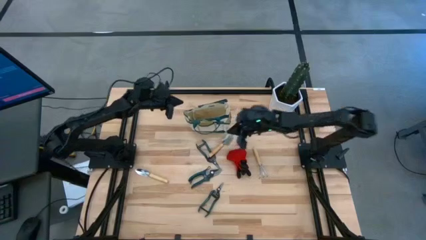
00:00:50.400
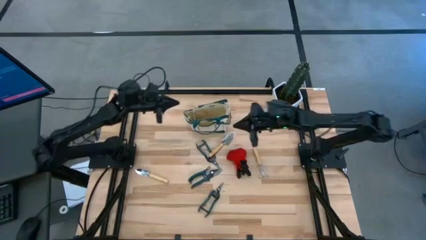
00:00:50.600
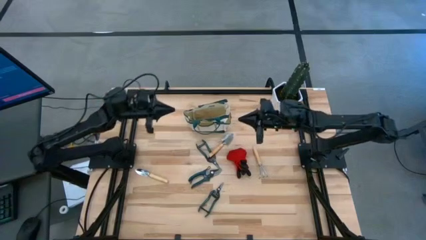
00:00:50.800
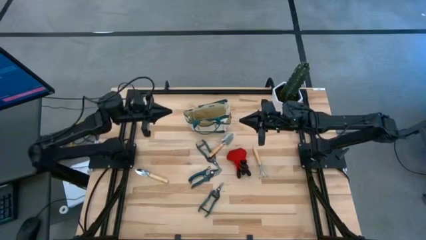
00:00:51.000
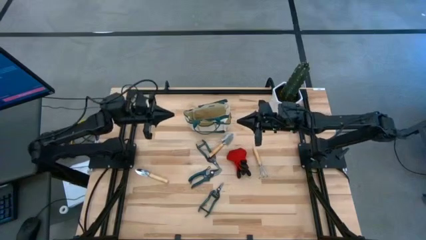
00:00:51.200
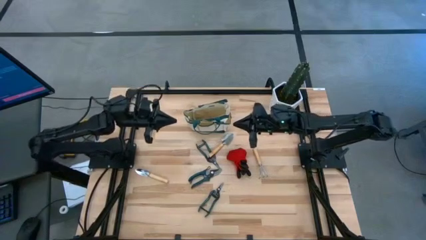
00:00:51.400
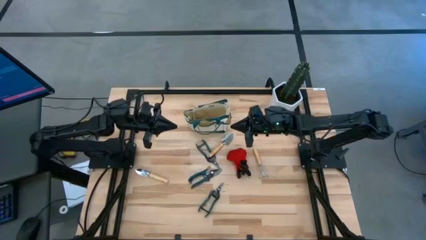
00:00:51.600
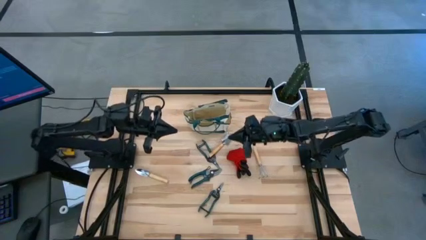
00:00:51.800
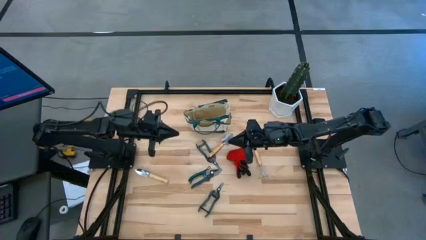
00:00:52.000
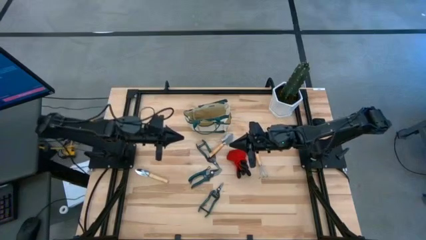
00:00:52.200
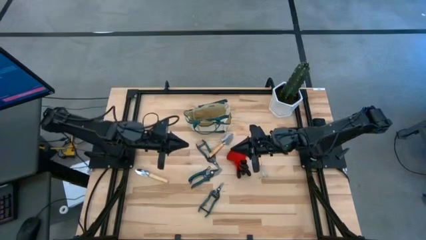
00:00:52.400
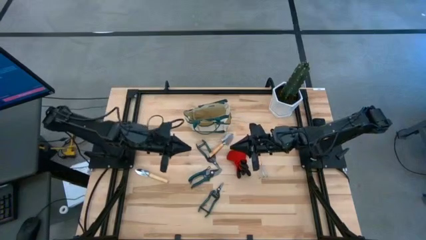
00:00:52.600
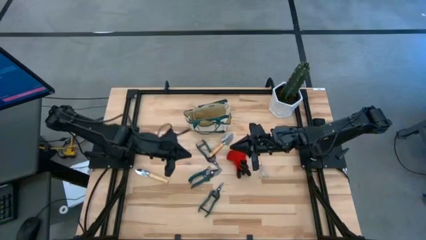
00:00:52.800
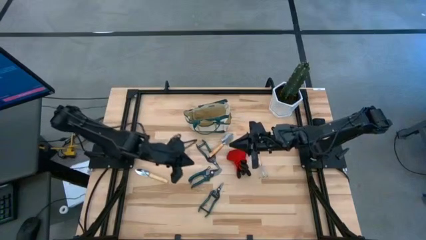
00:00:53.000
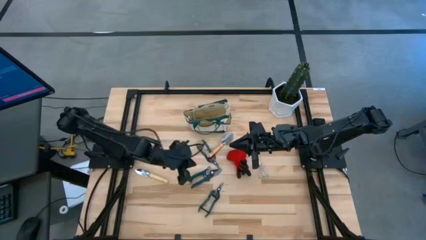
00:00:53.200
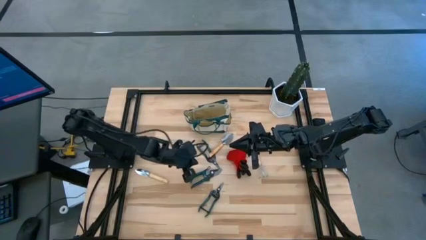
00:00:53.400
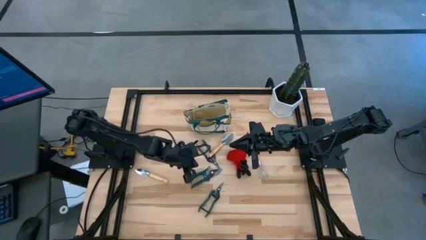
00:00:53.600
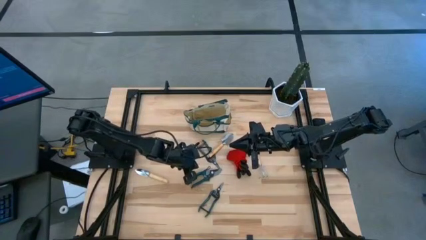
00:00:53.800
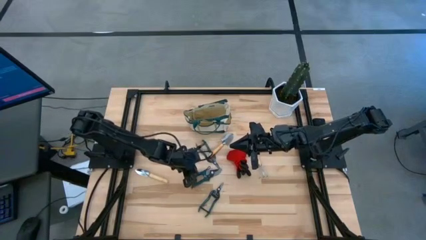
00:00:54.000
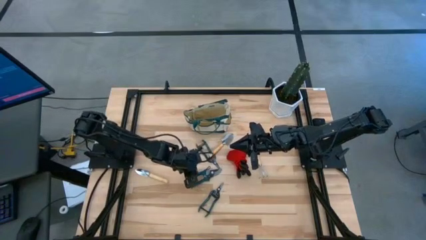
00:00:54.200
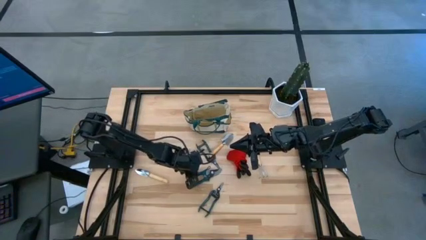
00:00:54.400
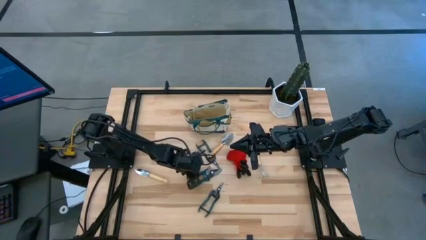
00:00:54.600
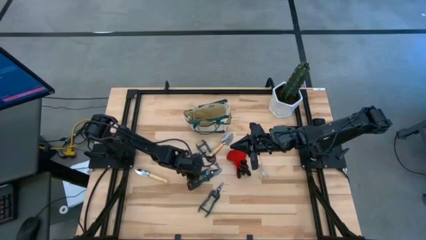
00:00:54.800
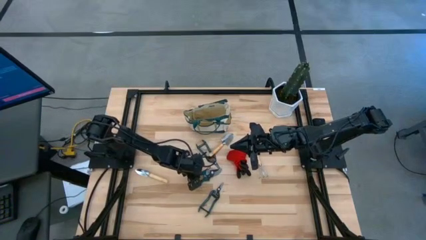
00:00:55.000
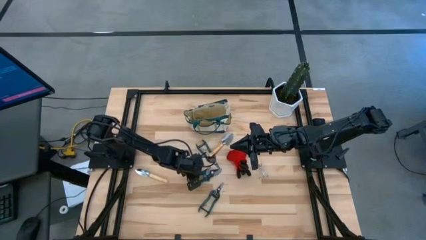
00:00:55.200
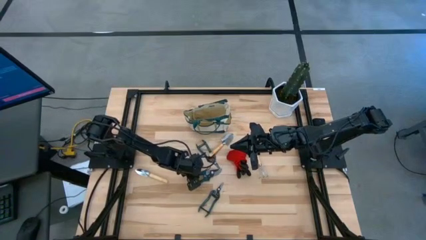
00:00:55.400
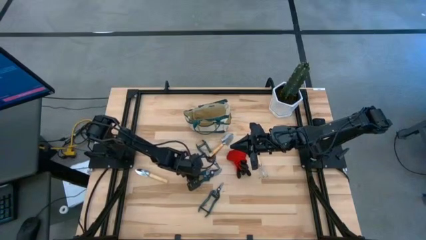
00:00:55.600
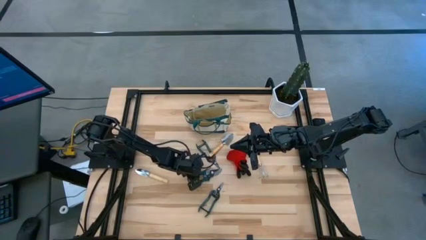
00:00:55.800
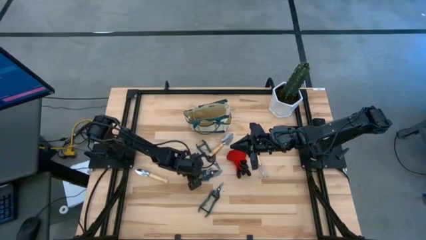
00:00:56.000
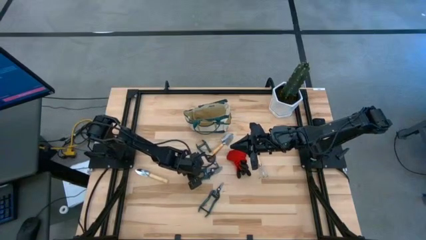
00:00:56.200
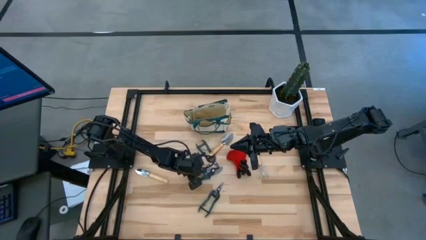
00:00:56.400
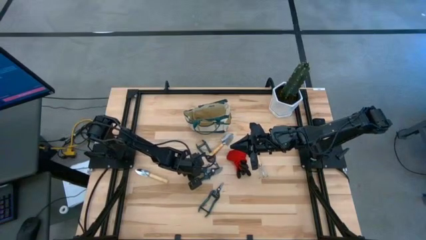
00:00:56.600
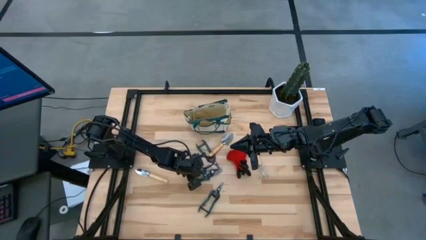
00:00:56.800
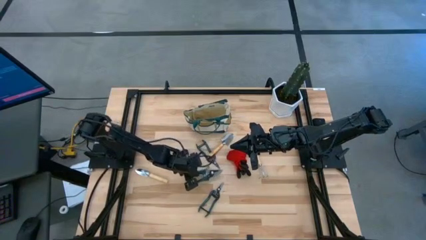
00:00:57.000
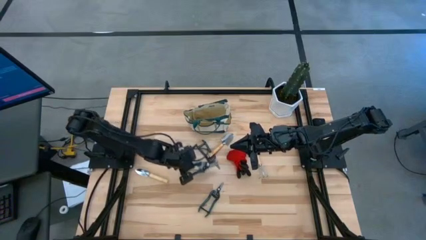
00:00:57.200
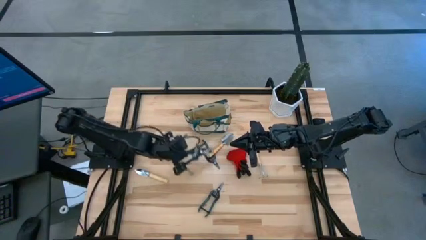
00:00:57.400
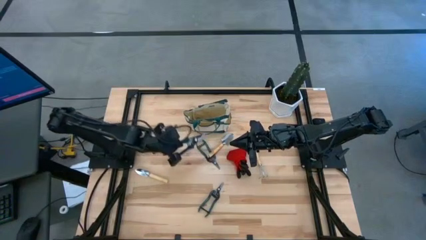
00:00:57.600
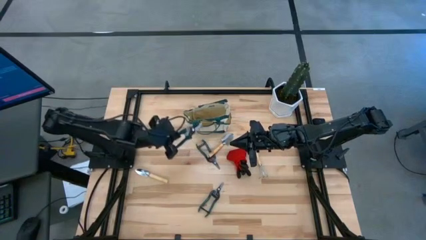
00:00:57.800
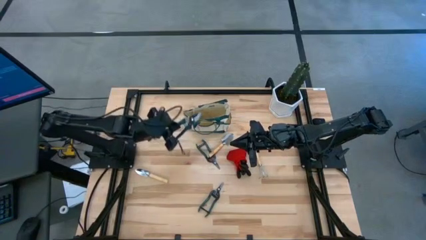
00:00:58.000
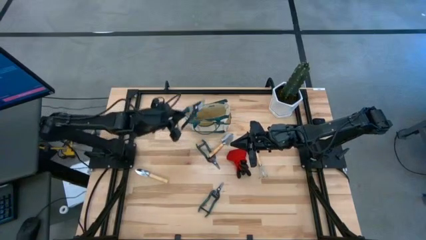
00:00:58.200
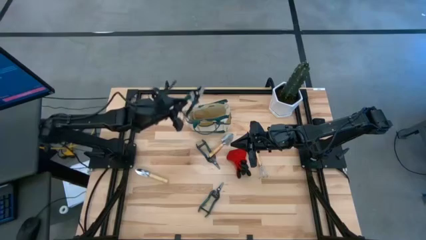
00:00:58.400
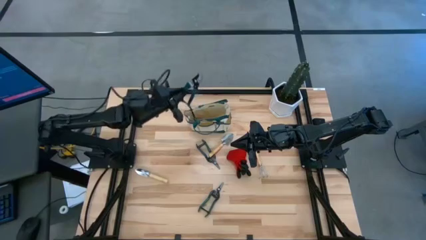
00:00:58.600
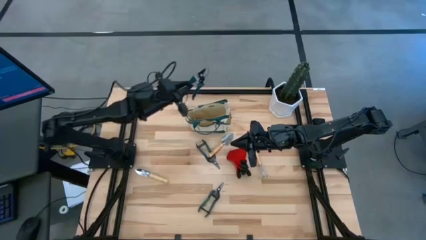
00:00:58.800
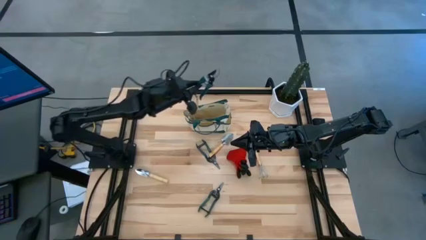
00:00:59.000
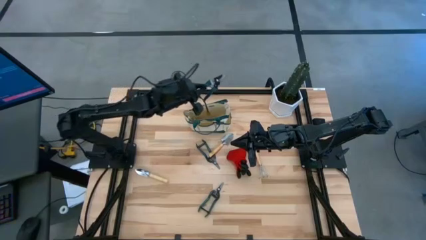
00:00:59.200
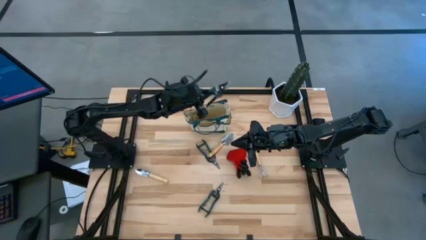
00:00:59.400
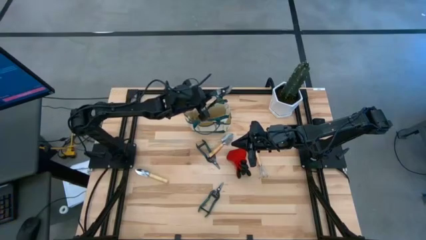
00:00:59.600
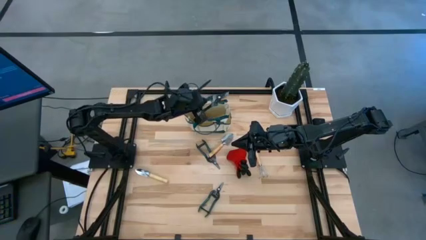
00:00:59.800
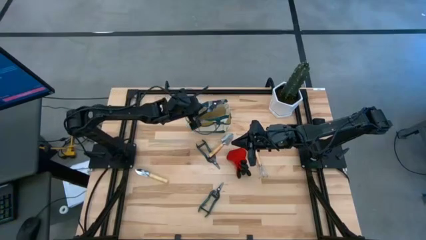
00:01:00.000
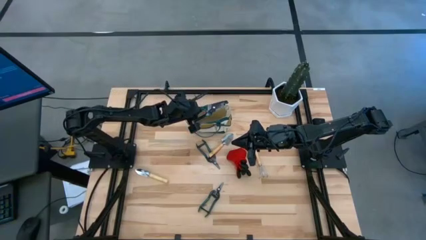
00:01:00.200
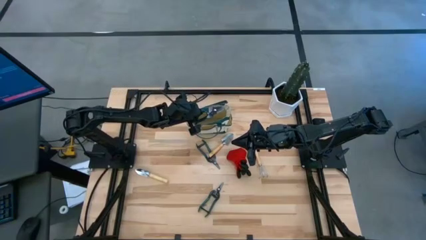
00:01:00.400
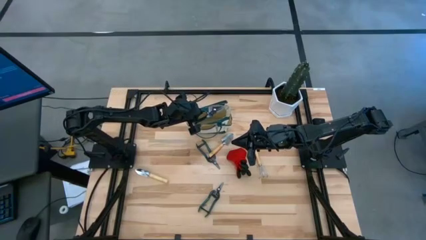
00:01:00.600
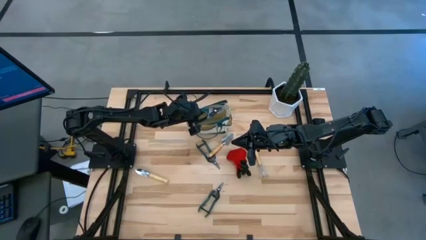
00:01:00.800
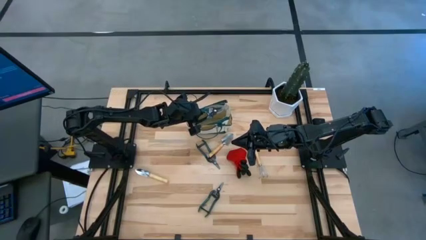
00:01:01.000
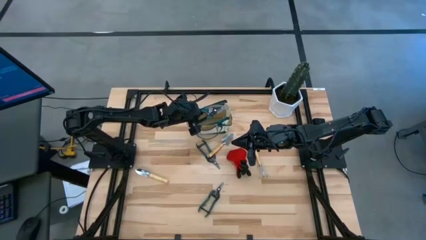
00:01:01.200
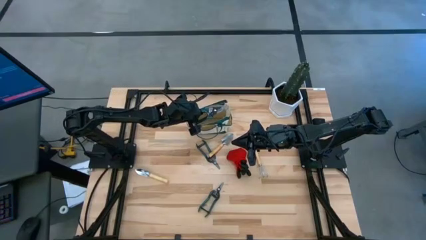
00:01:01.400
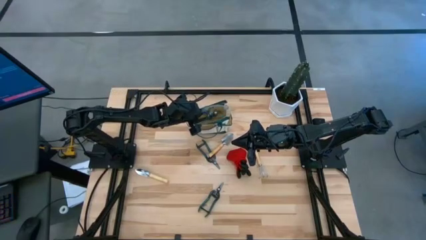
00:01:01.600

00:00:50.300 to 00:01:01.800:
Task: Pick & Place Garden tools in Gardening bag
Put the middle green shears into the brown gardening bag

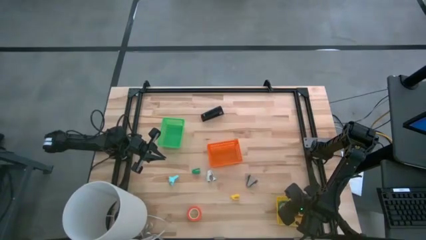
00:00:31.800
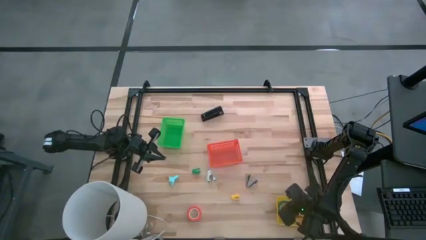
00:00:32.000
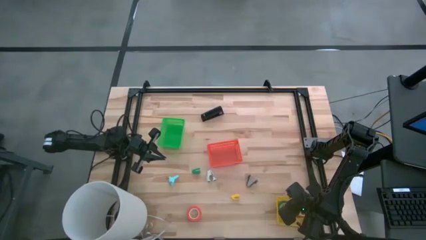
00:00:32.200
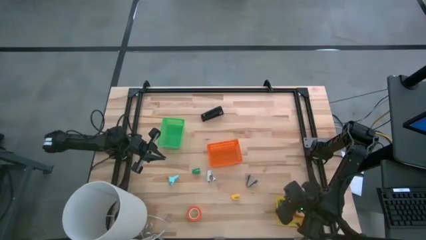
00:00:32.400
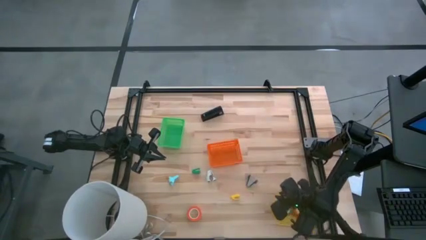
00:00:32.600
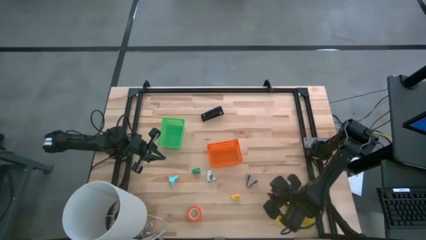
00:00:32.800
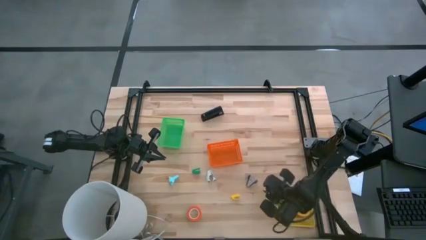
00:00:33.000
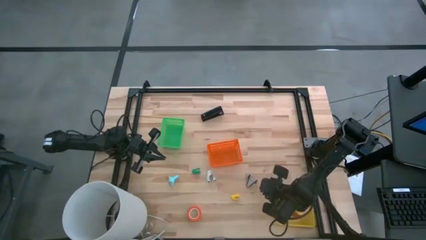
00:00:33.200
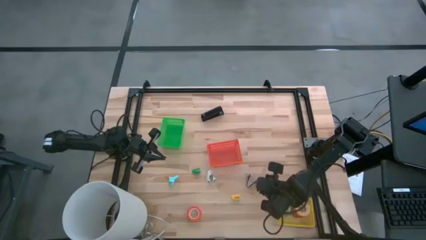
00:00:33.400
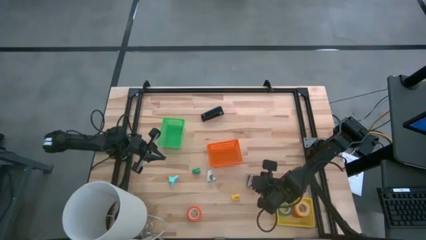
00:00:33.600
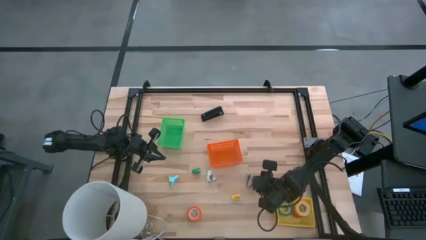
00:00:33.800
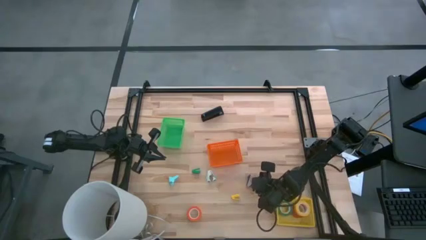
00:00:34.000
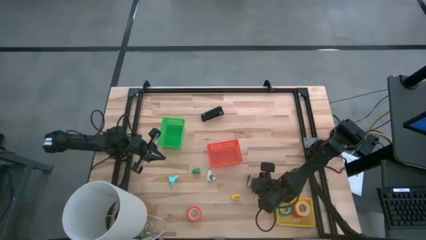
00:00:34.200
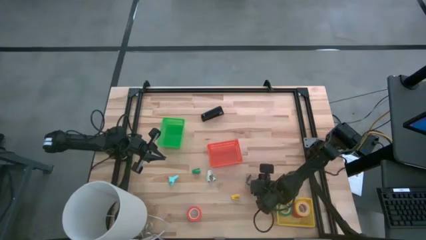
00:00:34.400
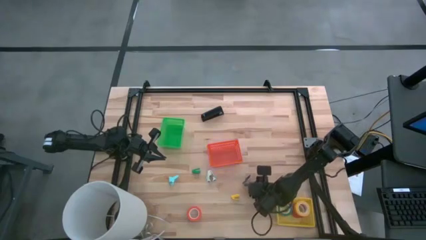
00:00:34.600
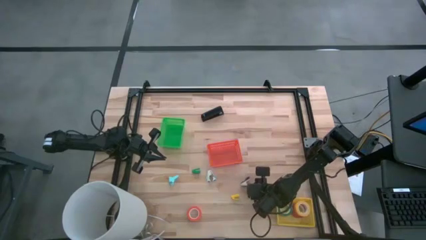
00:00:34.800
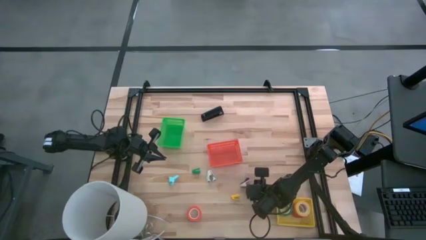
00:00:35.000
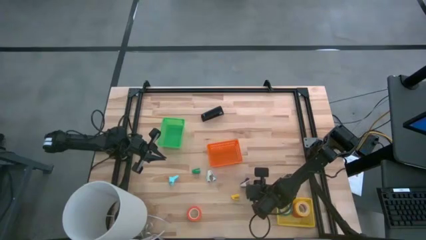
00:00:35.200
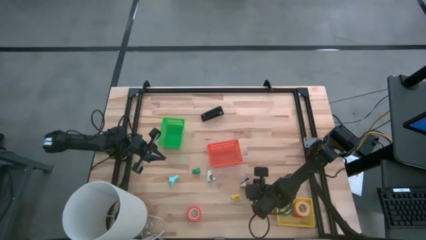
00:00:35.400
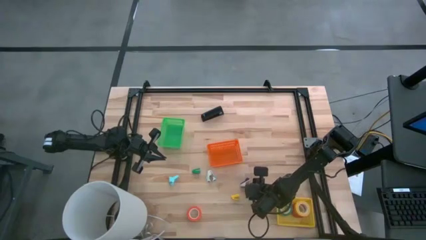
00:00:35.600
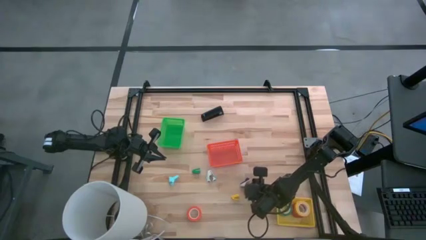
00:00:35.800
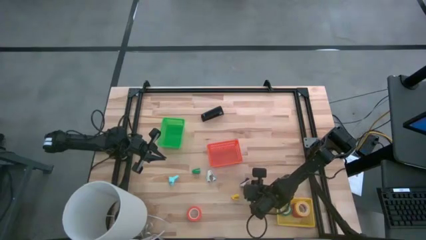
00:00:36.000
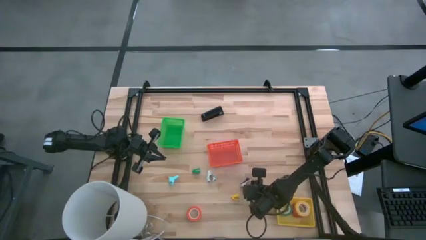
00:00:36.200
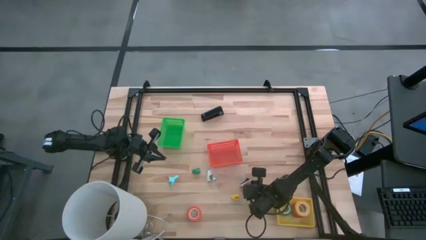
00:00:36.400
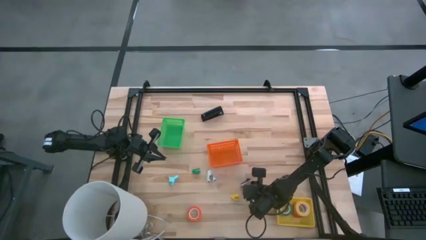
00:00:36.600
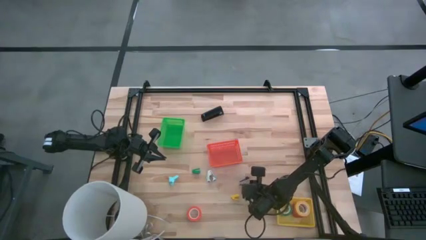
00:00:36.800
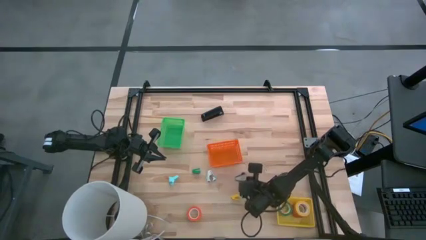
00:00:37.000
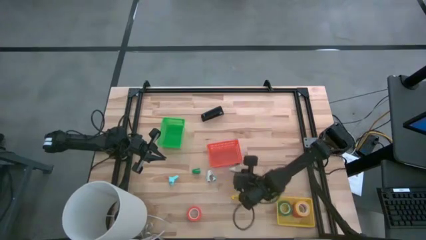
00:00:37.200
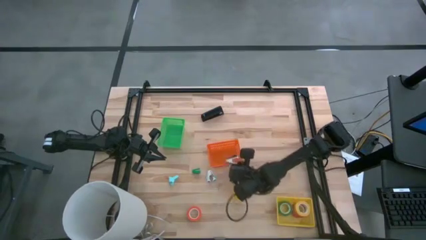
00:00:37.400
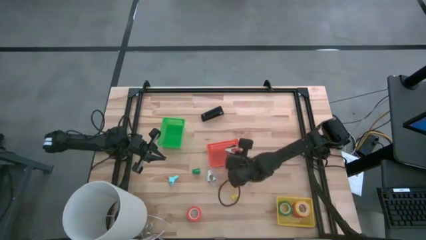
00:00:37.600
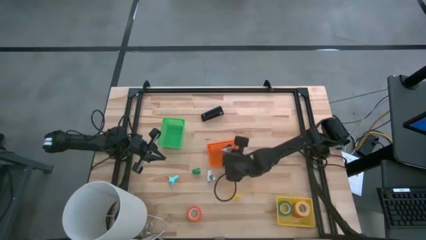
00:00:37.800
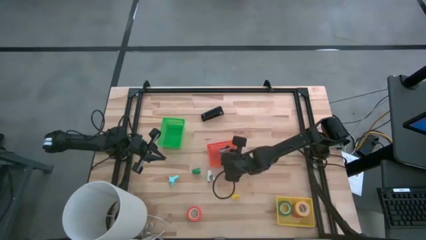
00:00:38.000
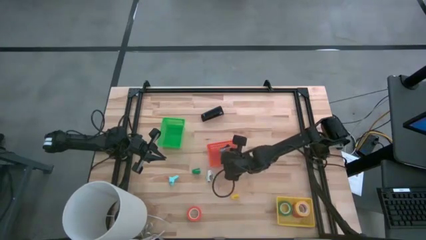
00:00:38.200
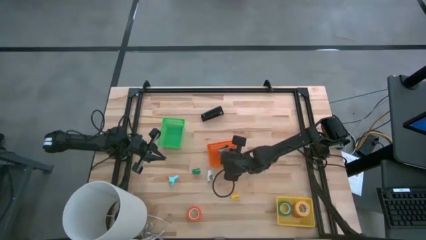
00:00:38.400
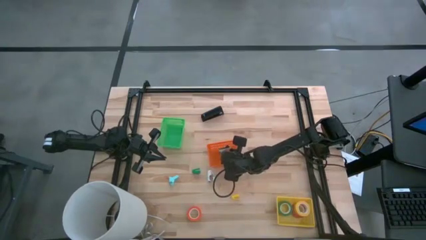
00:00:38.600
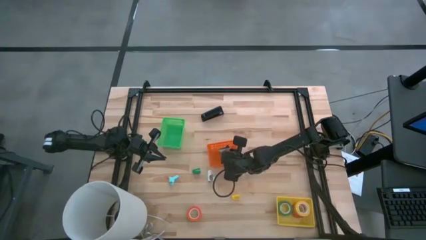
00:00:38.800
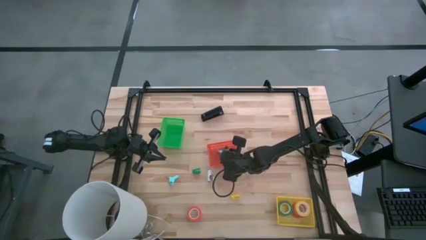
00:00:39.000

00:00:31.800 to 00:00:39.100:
Task: Pick and place Stapler, Stapler remover, tape
Put the black staple remover into the orange bin
